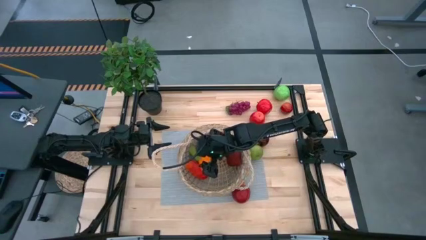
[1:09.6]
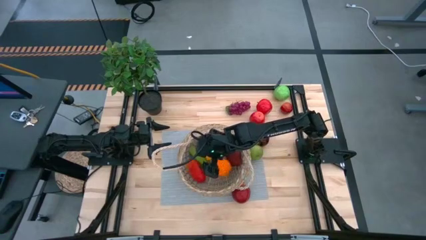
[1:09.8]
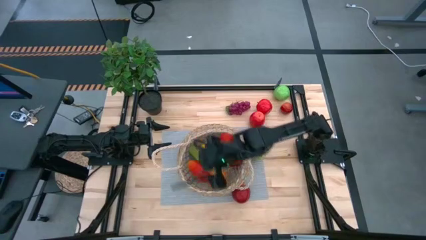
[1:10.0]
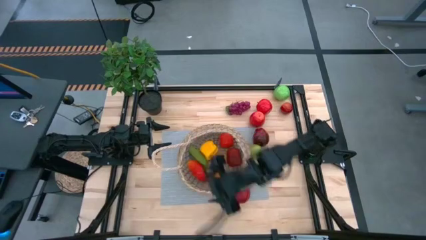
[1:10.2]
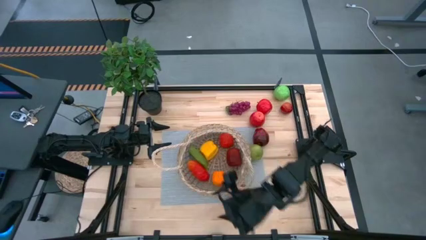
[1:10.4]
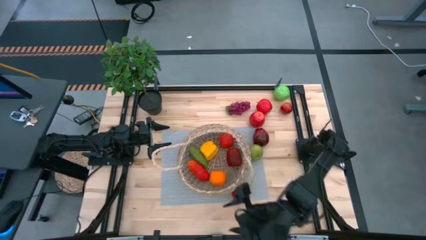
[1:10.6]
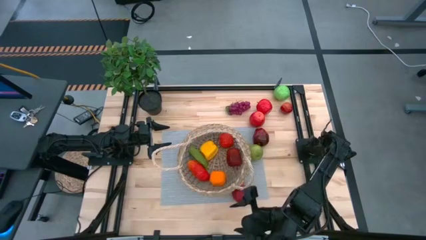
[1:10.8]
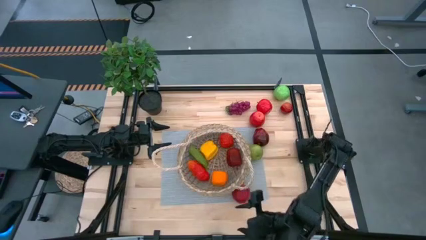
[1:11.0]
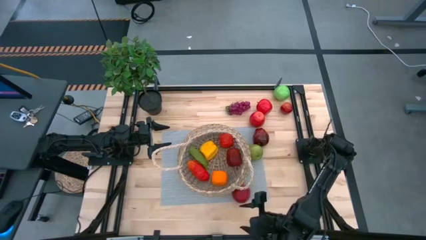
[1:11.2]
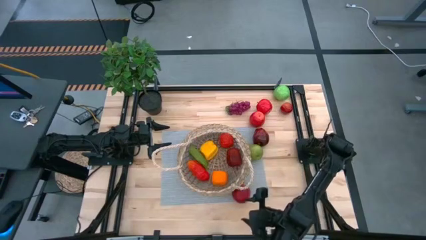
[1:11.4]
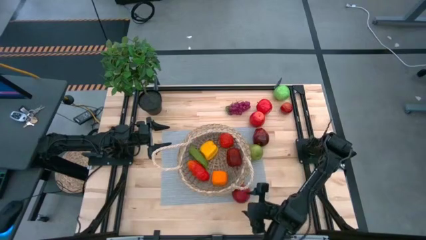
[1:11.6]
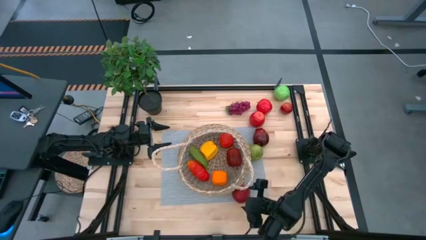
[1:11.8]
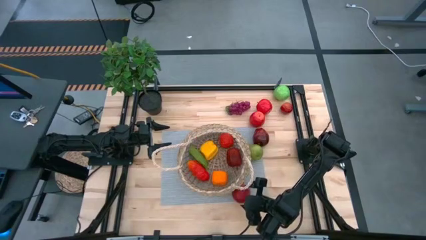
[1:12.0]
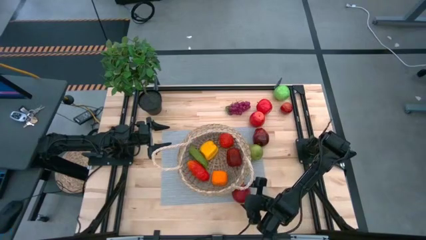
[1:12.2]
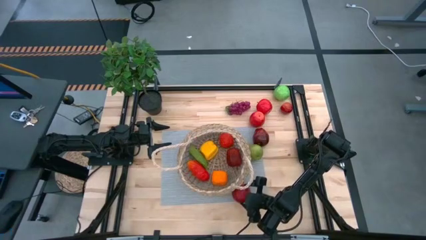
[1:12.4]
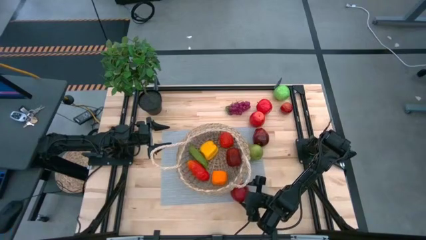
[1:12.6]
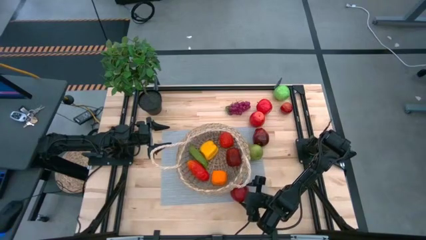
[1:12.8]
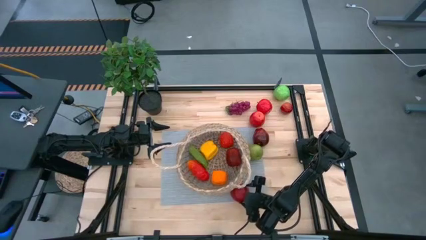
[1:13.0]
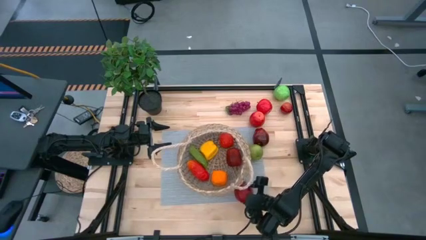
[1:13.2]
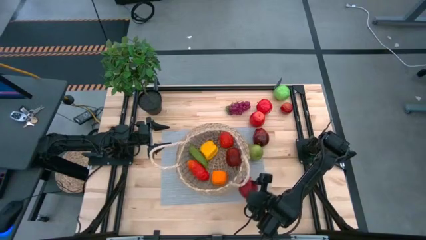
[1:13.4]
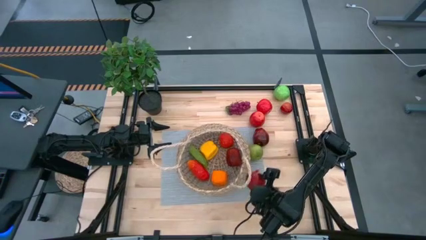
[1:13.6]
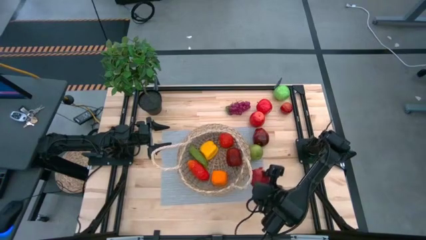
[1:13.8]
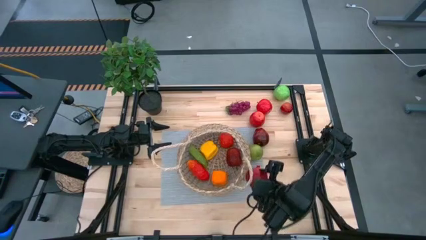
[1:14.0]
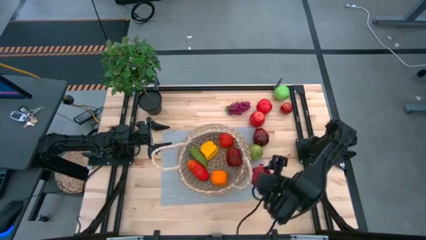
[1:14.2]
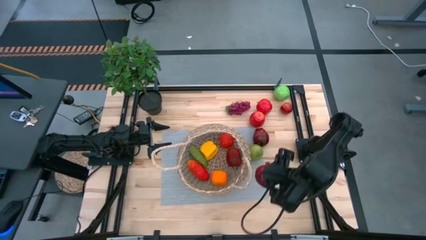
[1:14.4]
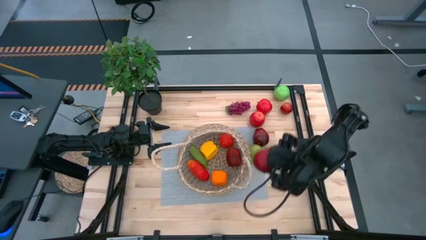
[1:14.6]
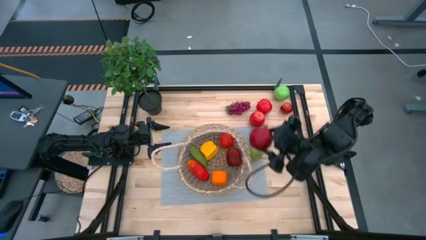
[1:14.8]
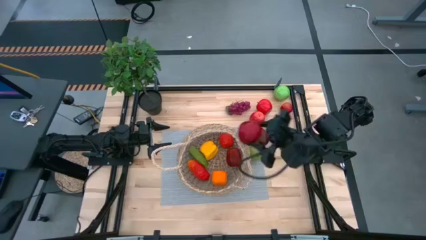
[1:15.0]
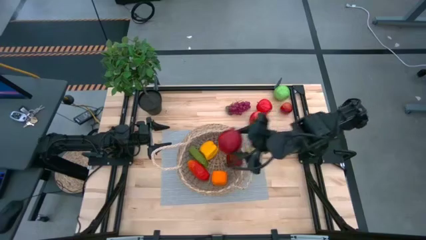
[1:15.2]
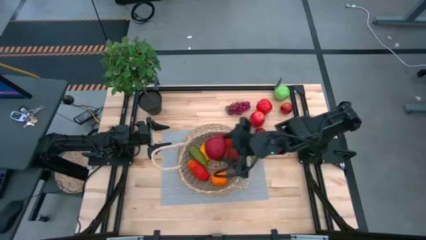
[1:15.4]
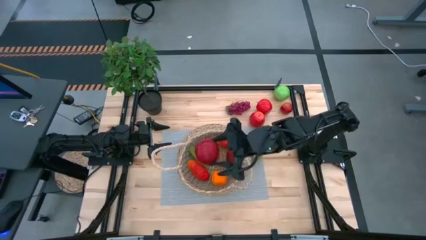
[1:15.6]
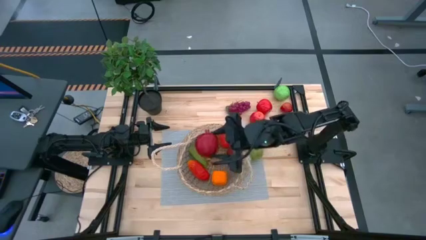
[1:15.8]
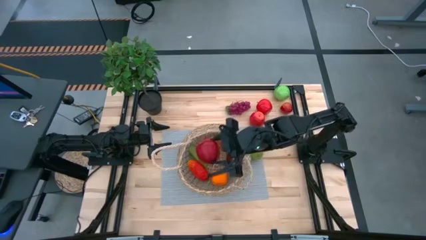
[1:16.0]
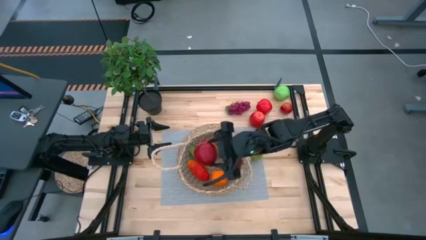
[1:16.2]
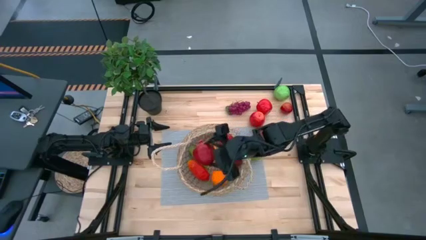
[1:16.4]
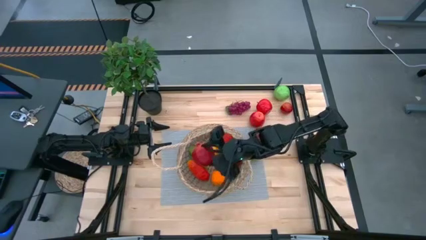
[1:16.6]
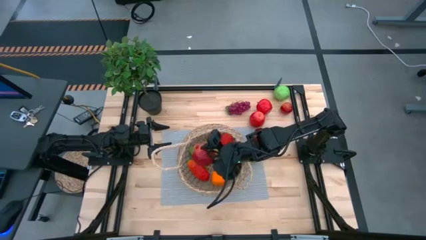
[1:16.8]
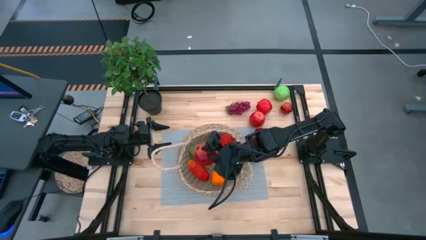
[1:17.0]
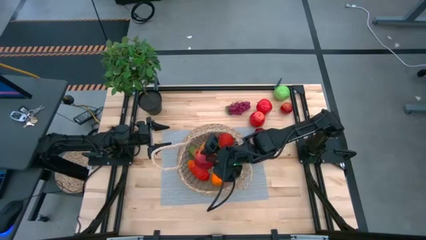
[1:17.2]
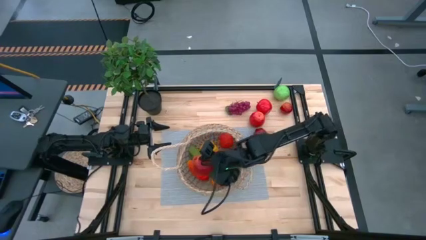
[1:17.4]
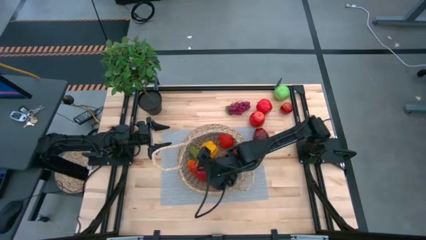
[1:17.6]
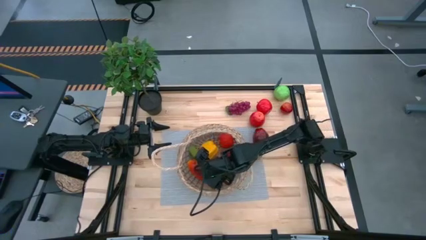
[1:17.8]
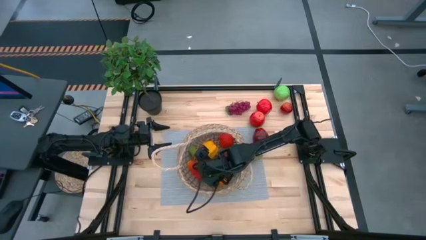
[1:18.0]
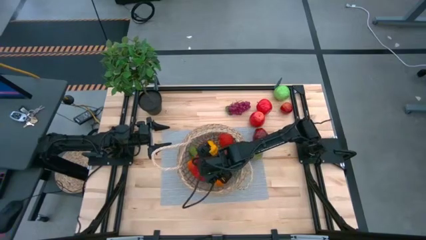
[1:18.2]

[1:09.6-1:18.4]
Task: Build produce basket
Put the pomegranate into the basket

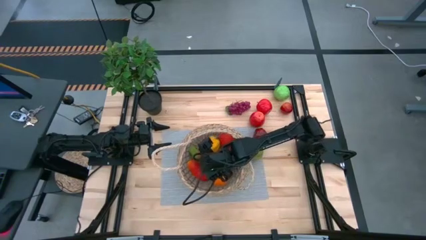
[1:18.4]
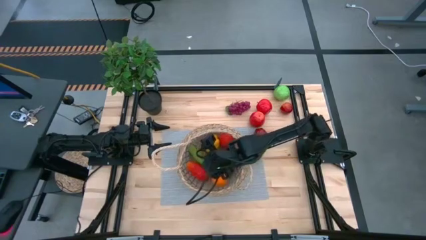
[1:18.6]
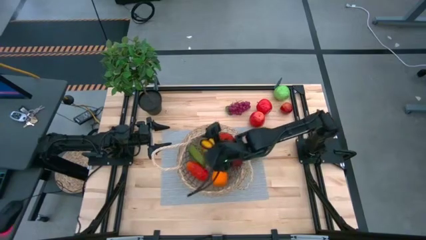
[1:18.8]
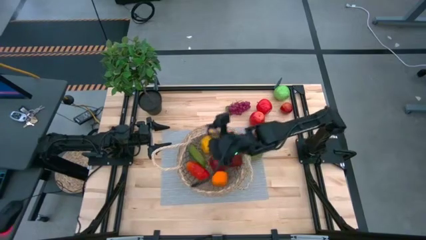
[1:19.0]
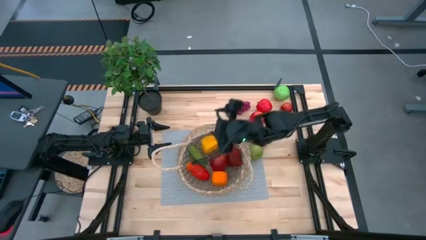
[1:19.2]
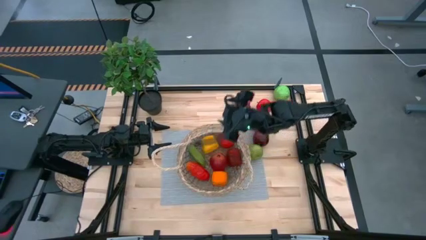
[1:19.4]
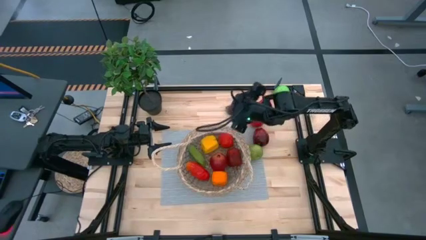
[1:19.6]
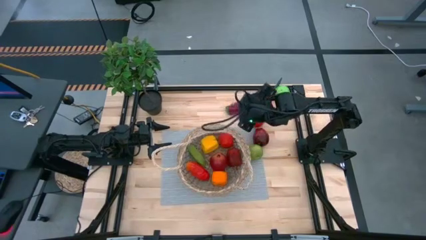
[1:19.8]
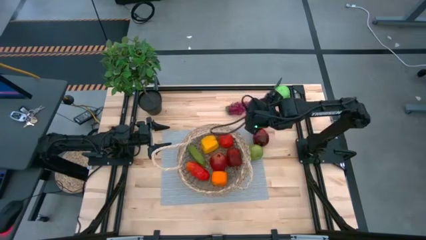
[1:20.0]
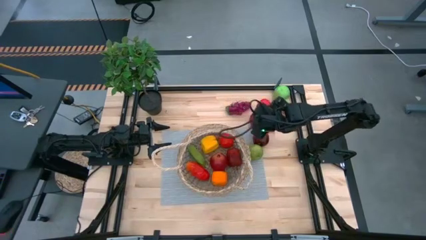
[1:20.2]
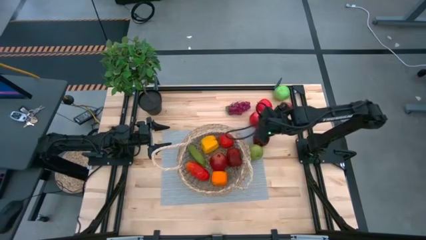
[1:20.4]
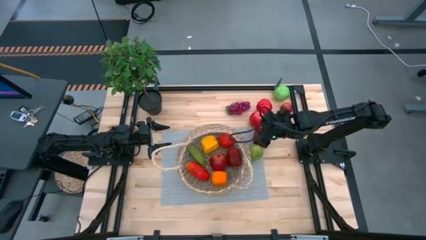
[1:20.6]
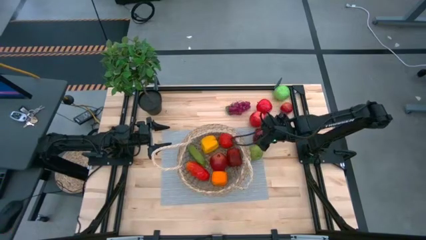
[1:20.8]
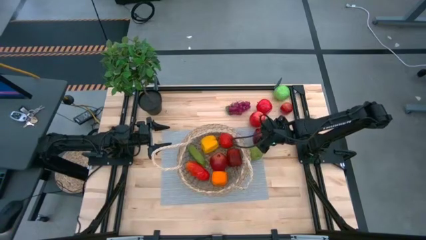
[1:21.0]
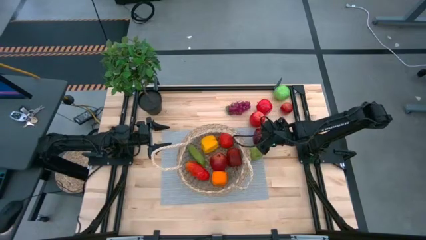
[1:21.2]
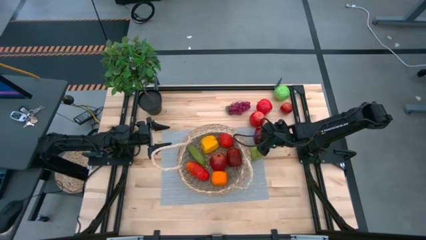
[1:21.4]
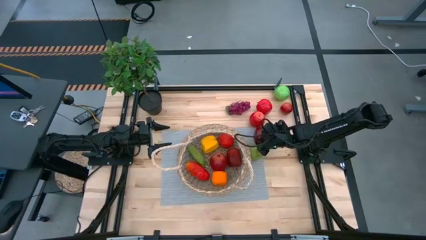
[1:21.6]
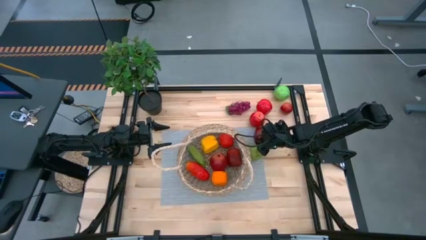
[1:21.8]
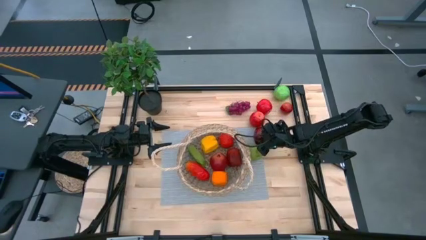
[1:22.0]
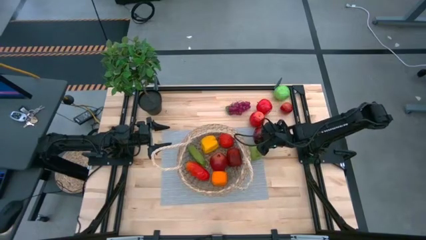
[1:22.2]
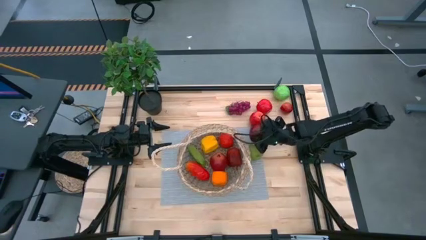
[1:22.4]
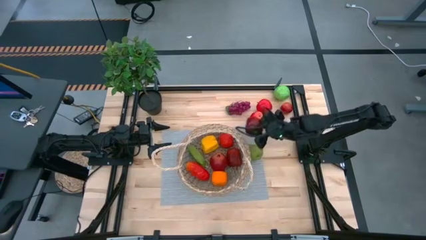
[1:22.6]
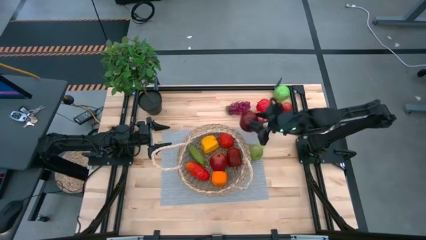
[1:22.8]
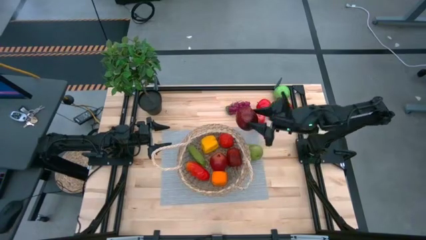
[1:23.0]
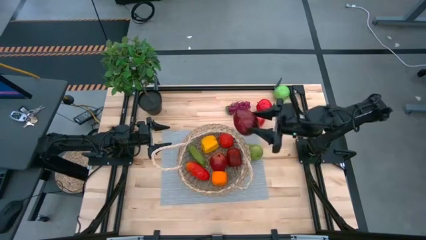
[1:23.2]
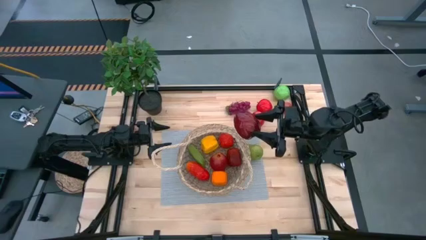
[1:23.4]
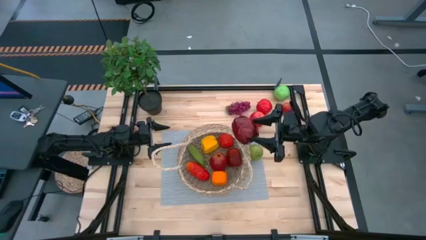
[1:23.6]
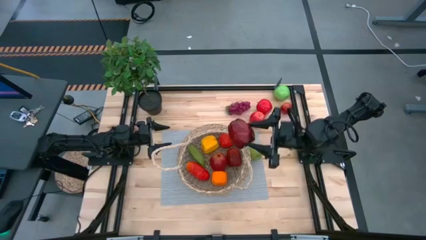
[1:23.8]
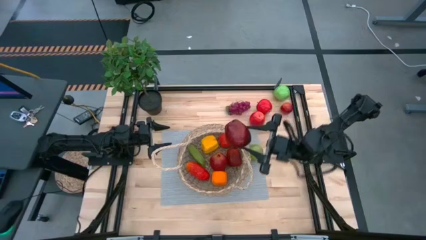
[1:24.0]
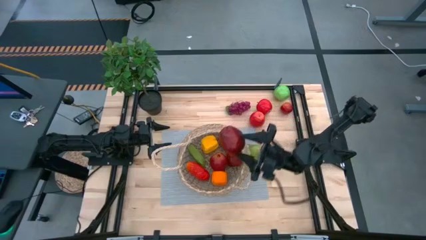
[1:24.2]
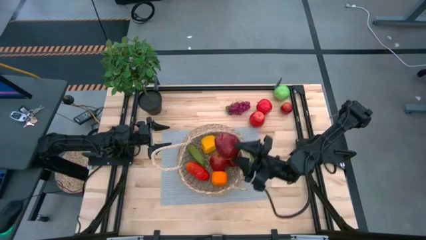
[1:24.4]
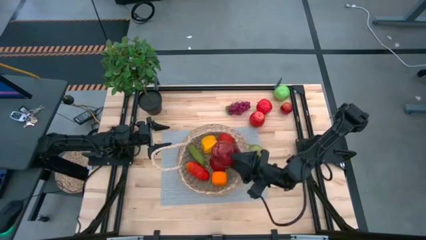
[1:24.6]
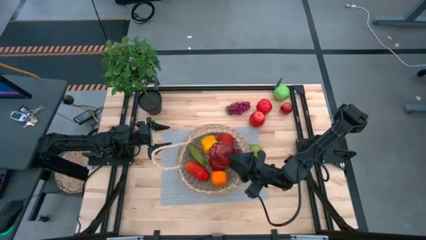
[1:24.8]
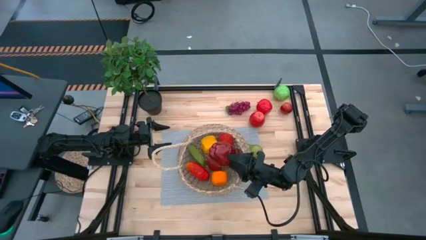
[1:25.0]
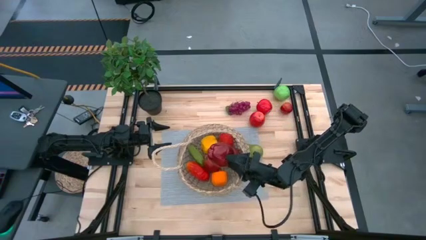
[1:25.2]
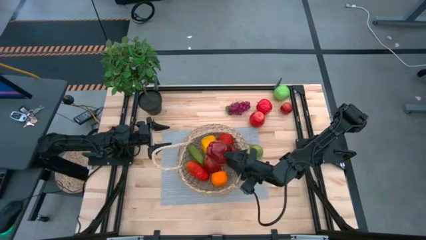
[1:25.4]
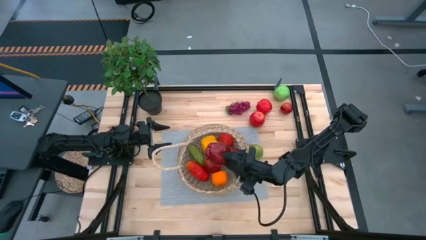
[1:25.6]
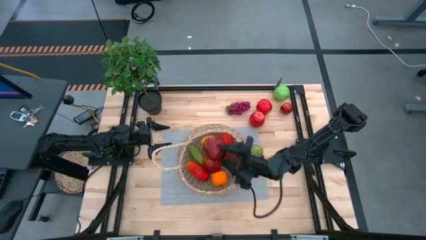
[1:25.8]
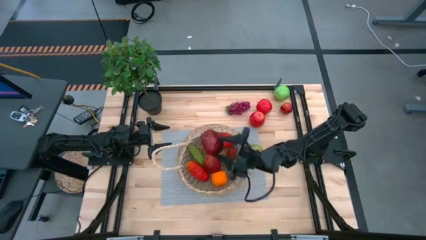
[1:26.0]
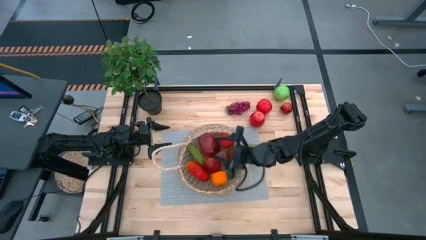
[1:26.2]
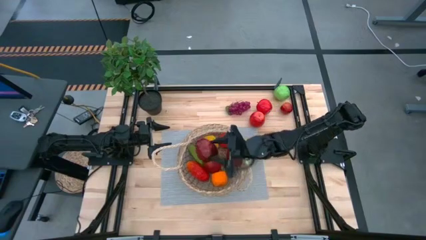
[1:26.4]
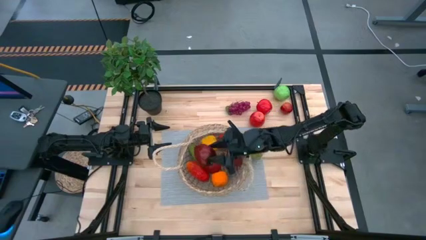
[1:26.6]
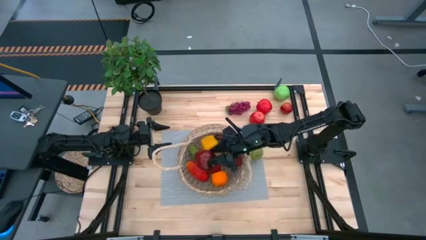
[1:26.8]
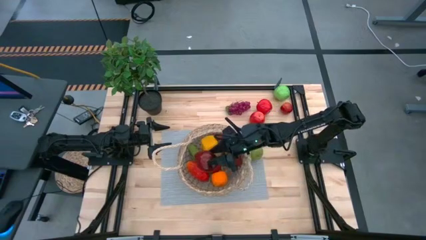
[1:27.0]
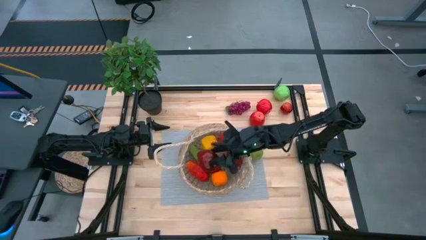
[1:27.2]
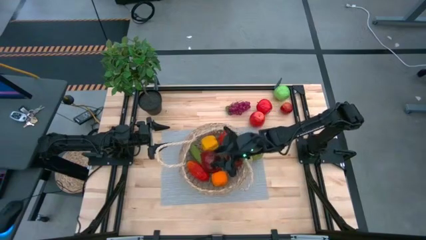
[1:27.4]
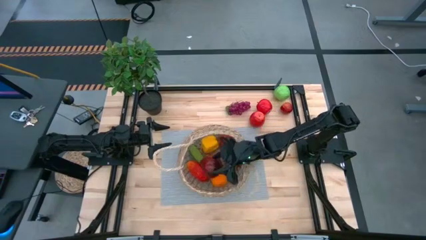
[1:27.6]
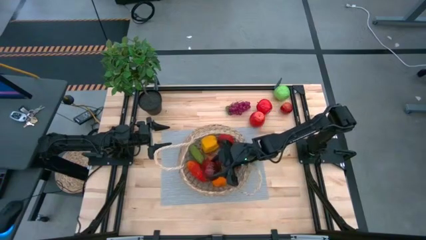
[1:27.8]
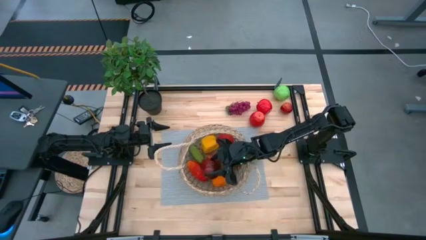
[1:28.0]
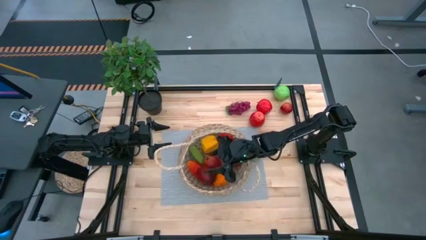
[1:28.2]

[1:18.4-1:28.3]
Put the dark red apple into the basket
